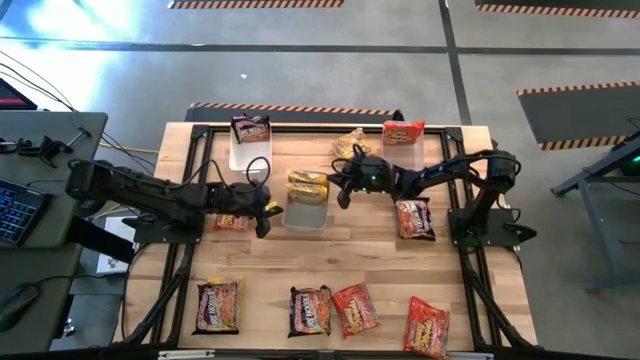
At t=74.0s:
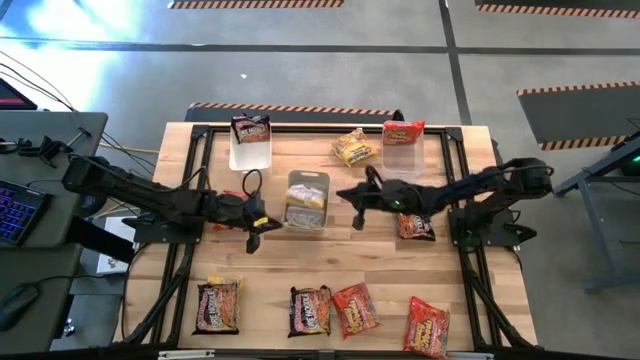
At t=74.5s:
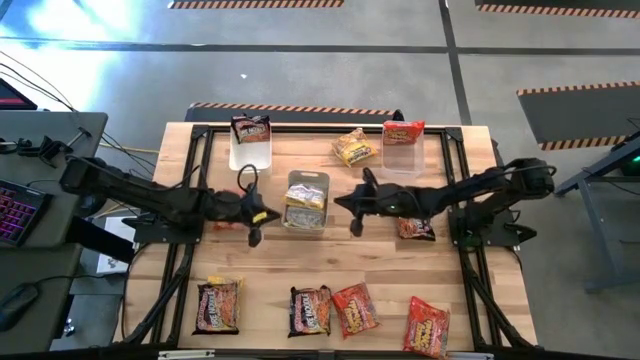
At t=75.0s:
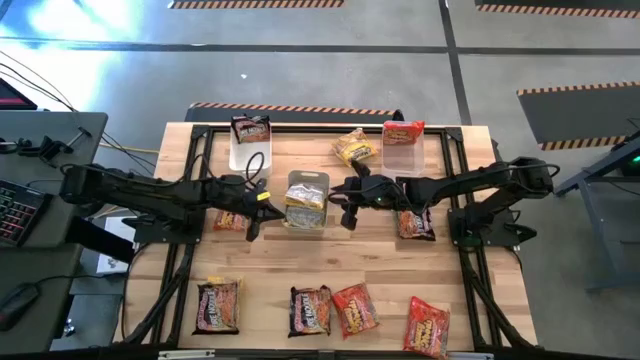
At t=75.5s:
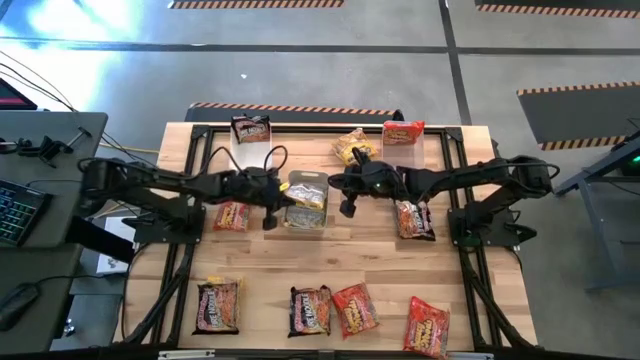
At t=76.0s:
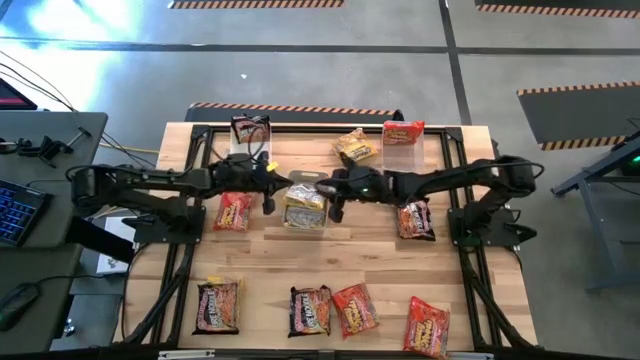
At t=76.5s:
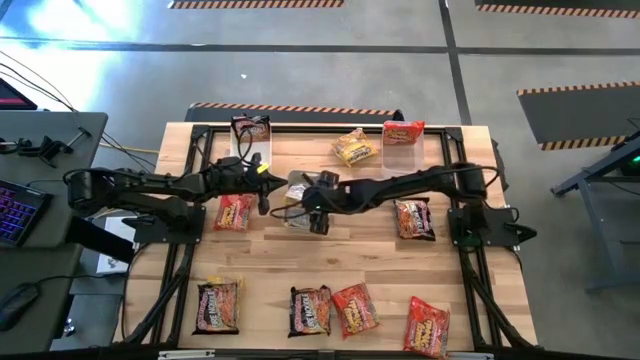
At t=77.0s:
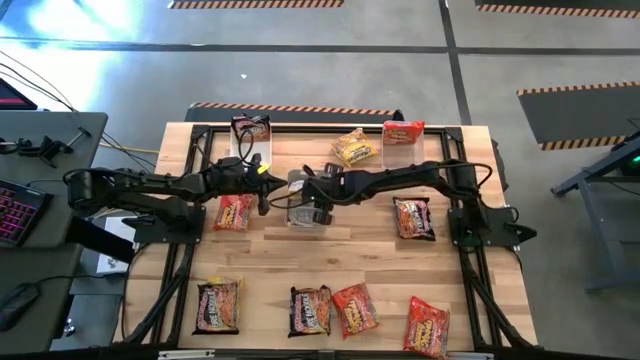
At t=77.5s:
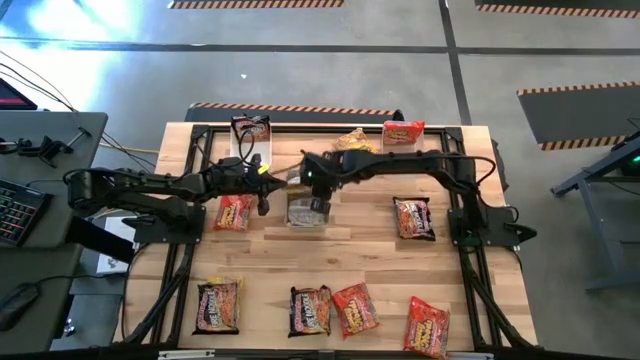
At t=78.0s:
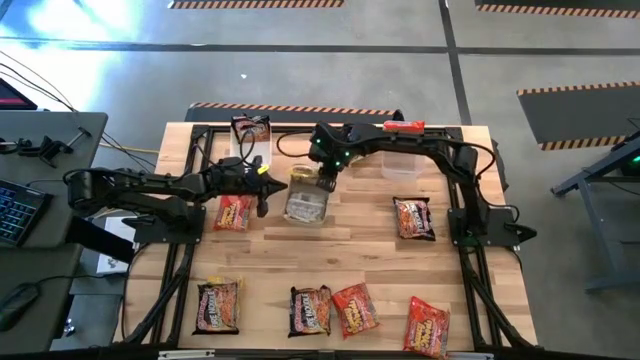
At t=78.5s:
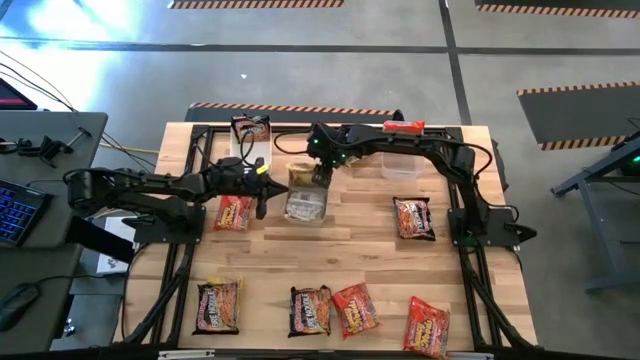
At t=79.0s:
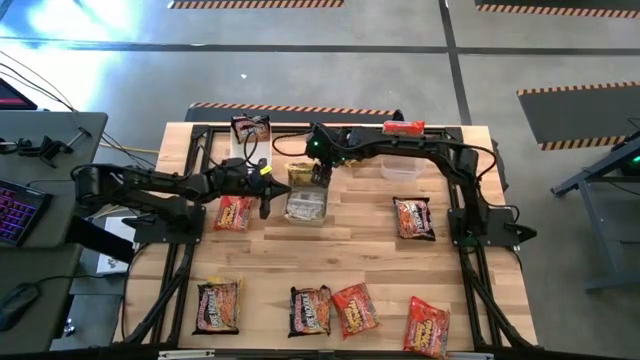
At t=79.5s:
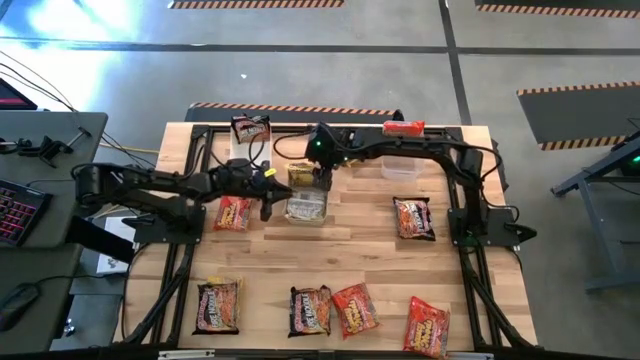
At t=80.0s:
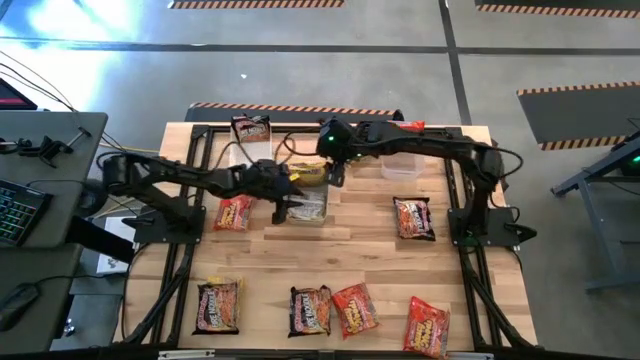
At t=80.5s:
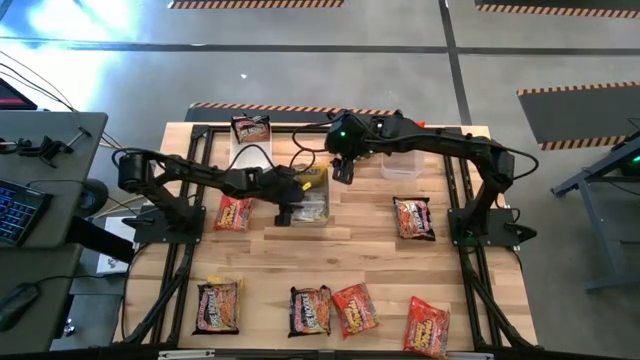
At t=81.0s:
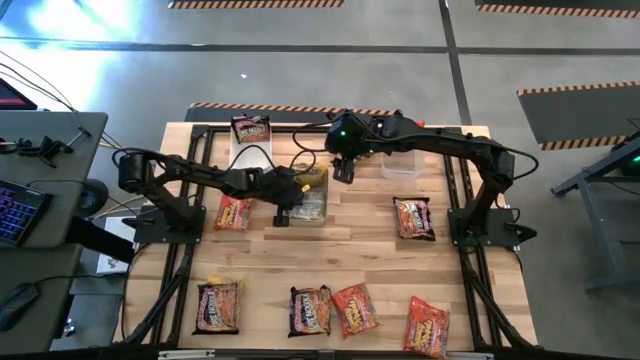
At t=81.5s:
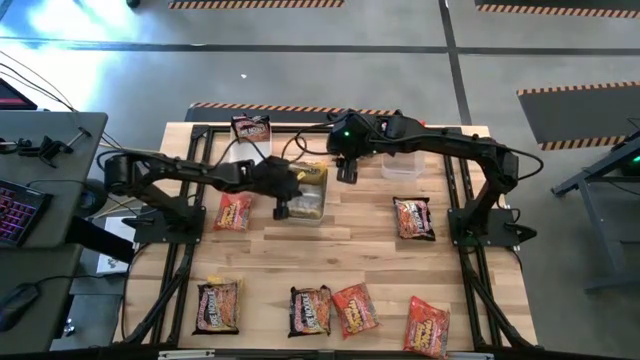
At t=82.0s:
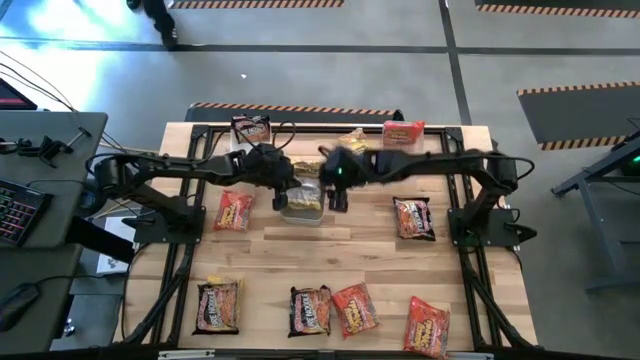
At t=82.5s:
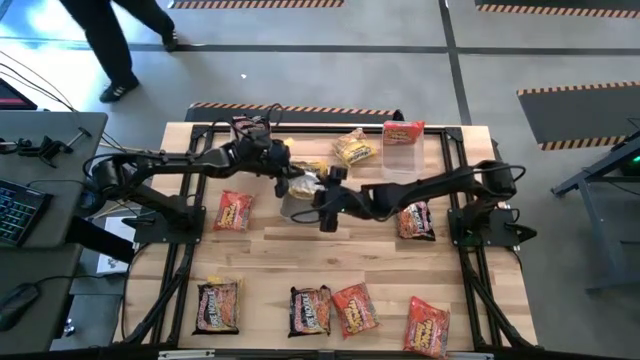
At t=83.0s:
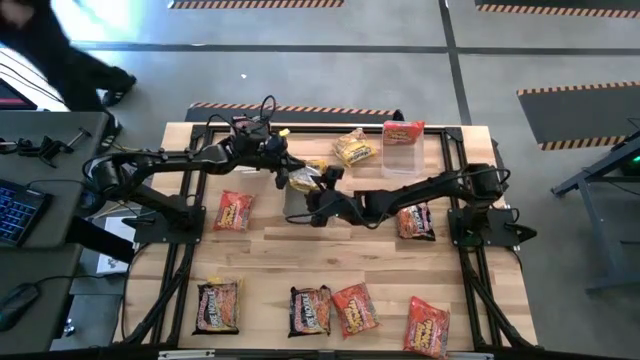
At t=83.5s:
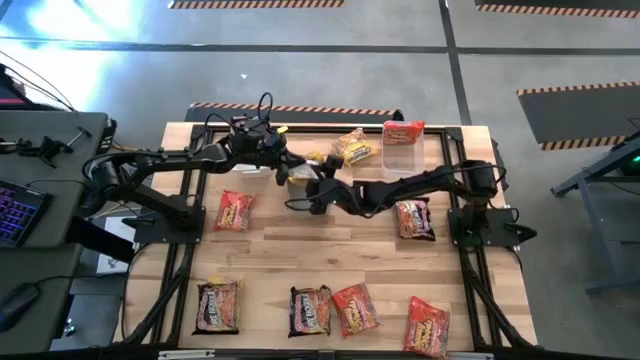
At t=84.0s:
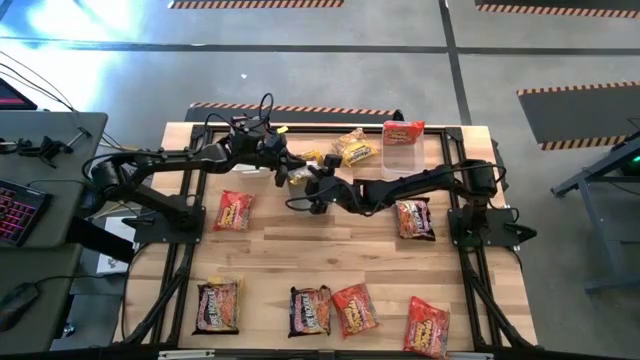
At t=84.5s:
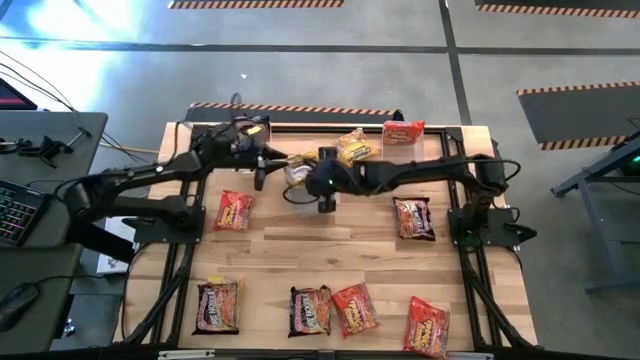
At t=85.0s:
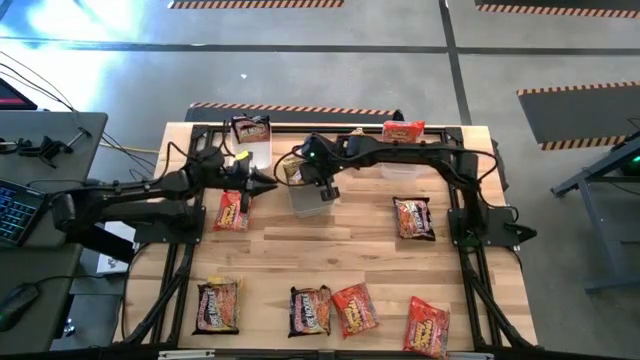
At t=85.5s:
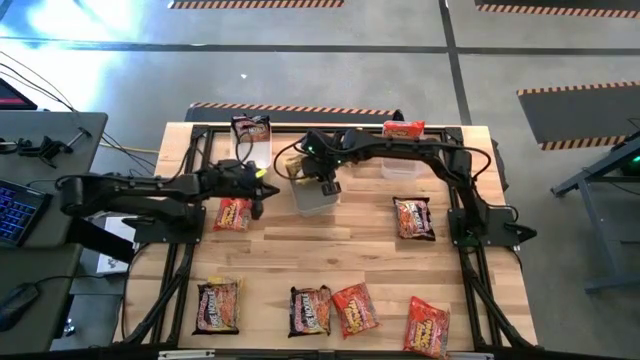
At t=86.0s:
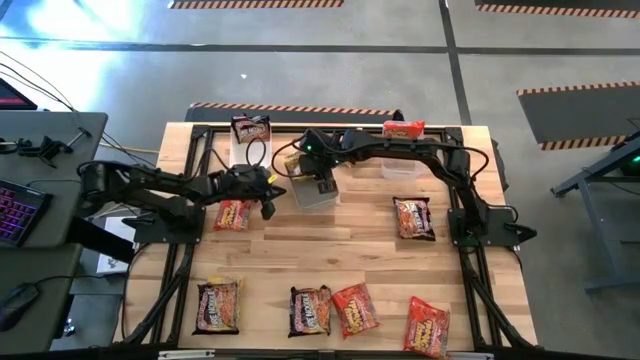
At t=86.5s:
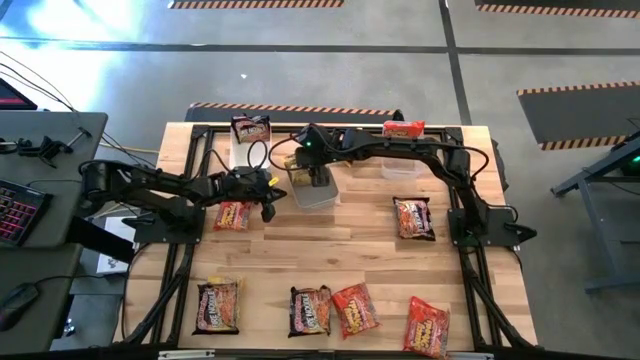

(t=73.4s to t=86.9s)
Task: Sort Maruchan noodles
Adjust the yellow noodle packs in the gray bin

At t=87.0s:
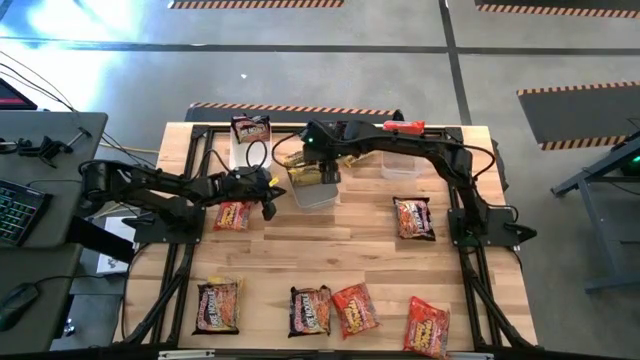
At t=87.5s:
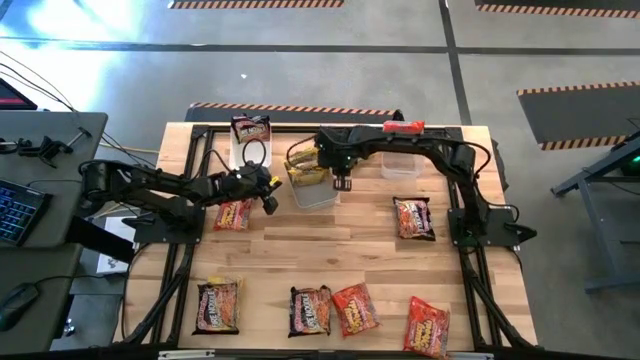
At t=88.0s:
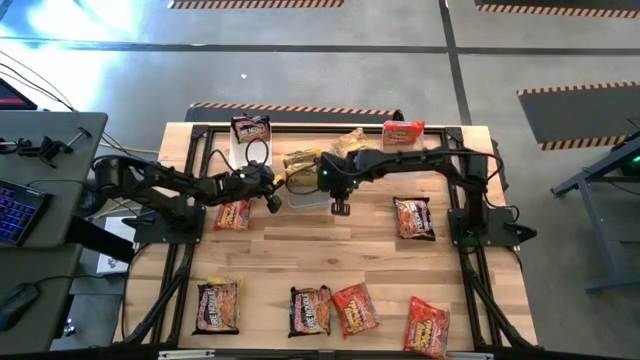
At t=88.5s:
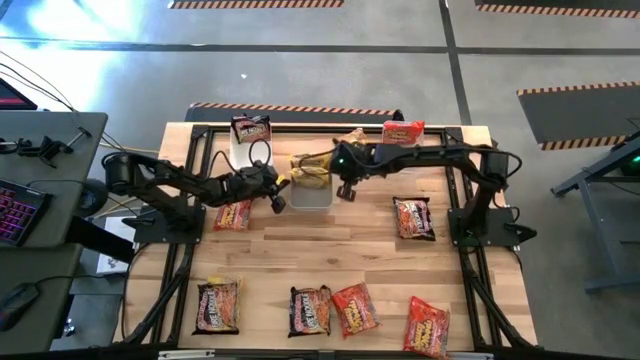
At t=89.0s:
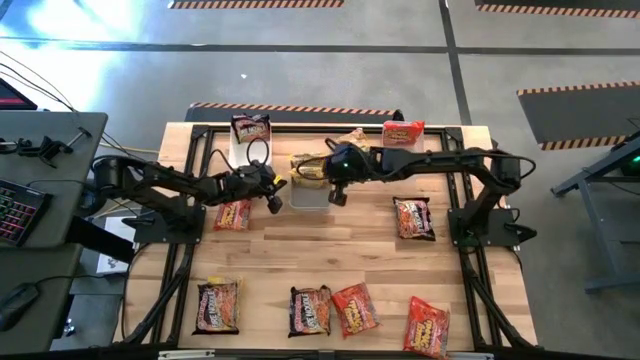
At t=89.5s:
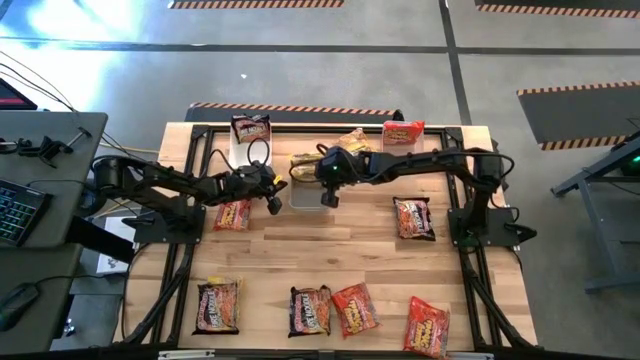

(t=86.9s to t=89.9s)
Adjust the gray bin

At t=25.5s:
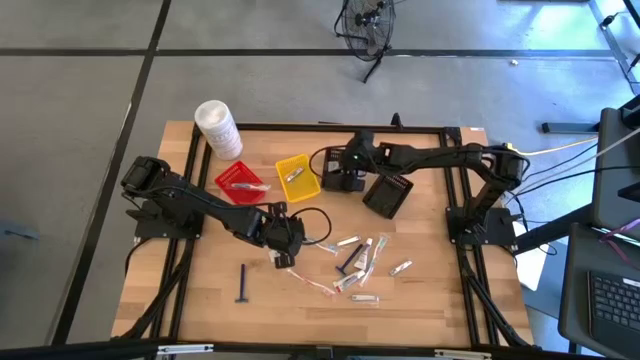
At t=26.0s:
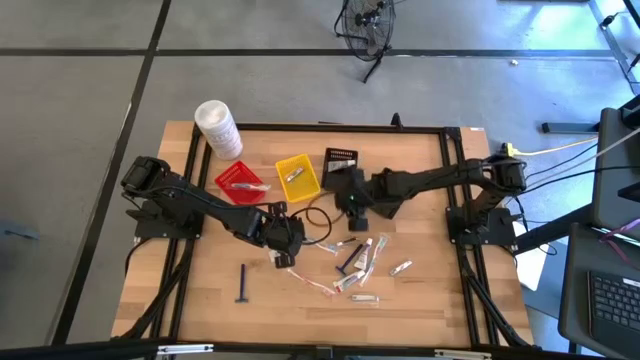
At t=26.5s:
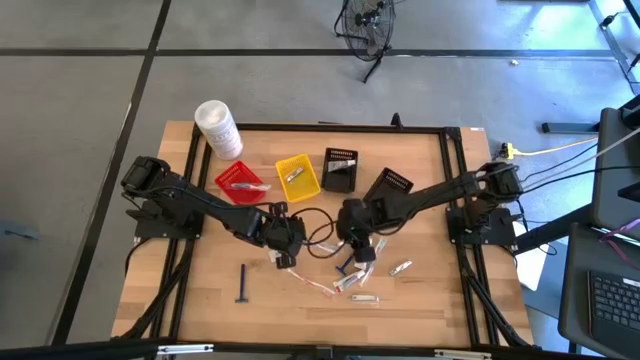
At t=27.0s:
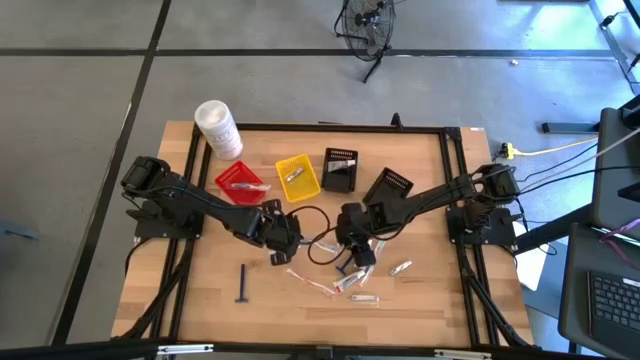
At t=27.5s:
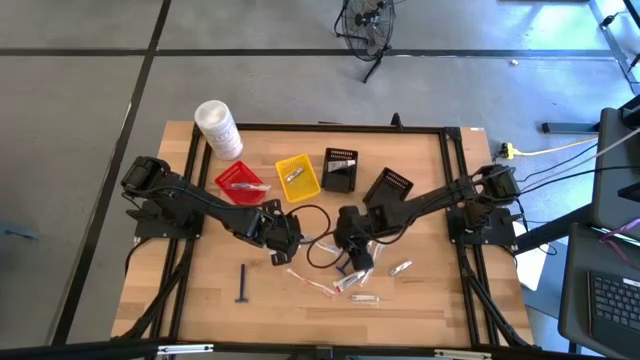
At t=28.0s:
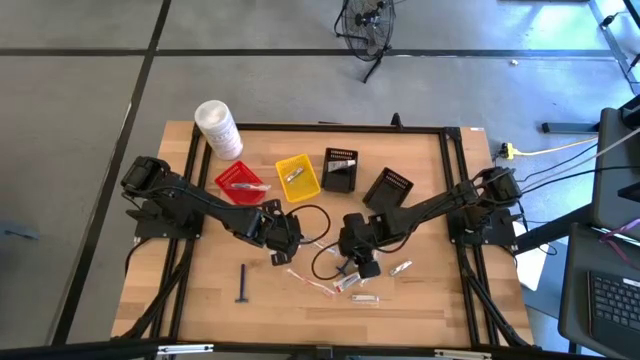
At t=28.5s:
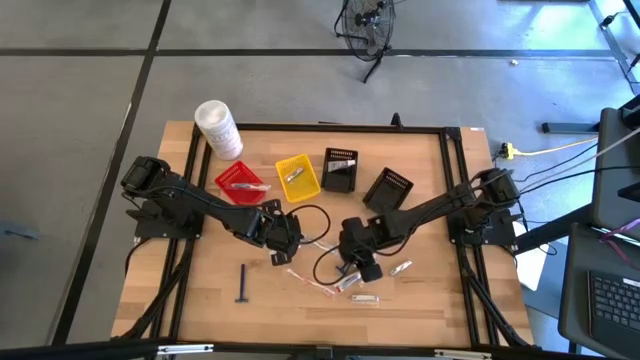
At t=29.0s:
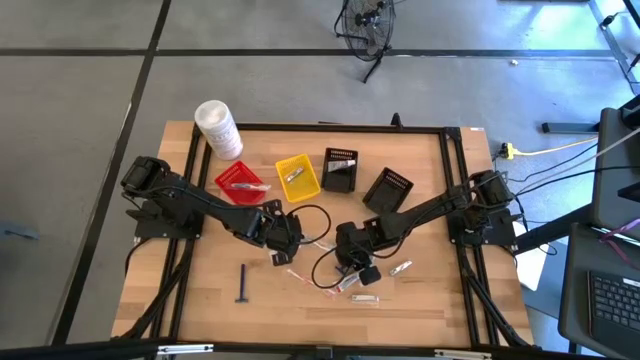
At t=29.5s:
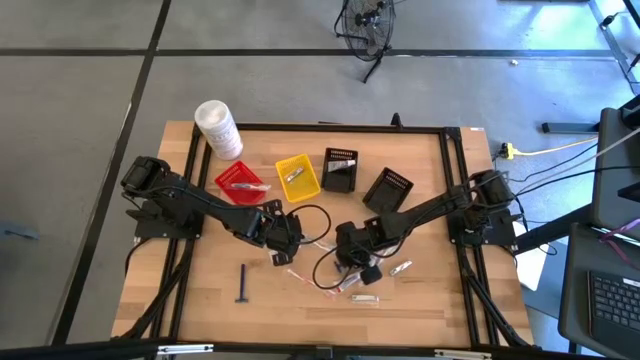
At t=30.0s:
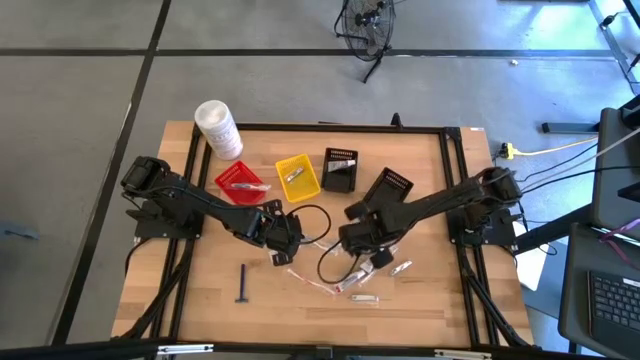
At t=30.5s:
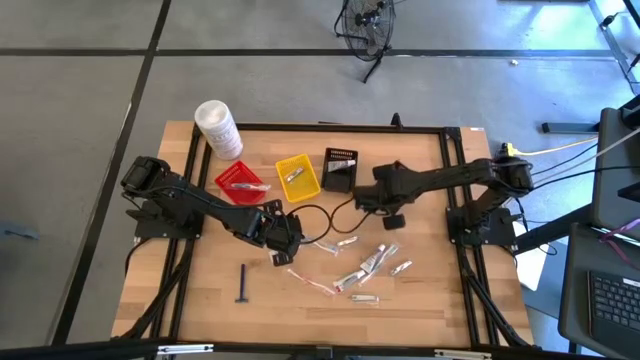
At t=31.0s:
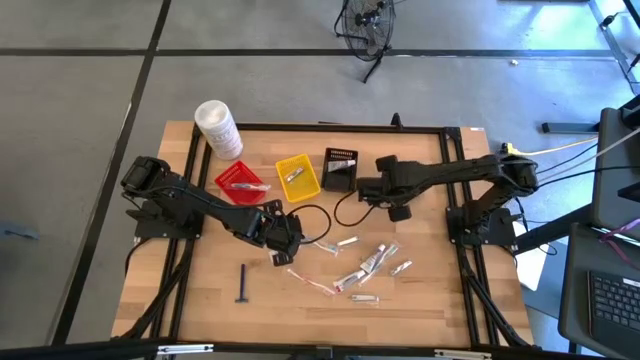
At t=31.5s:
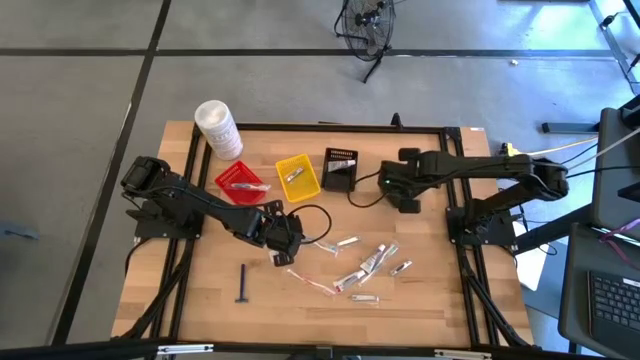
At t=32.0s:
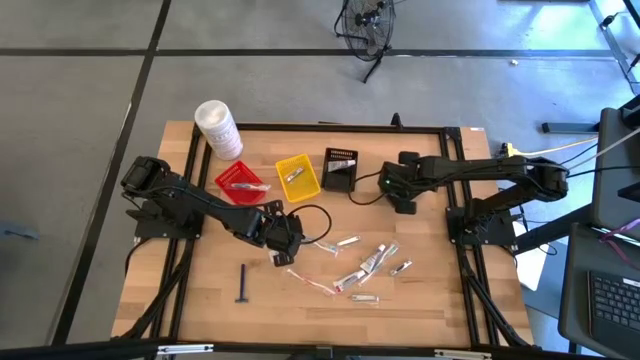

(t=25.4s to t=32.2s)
Task: Pick & Place Travel size toiletries
Put the razor into the right black bin
